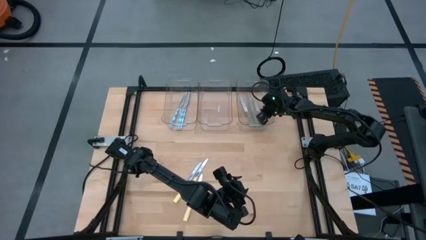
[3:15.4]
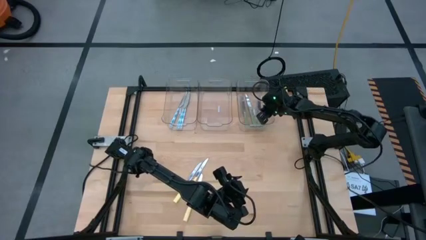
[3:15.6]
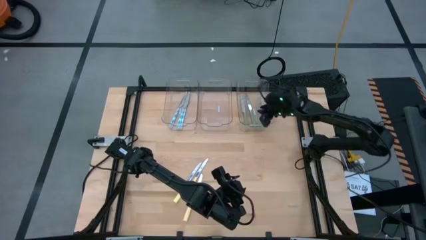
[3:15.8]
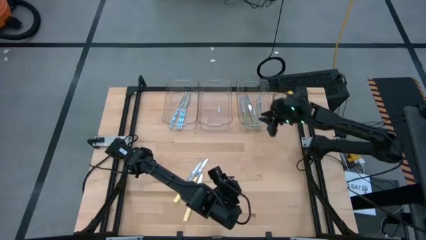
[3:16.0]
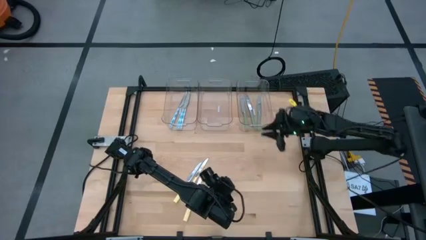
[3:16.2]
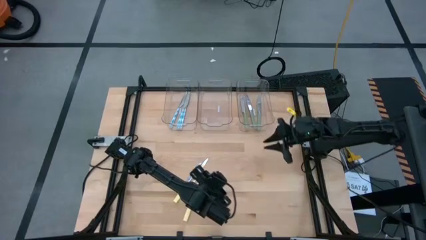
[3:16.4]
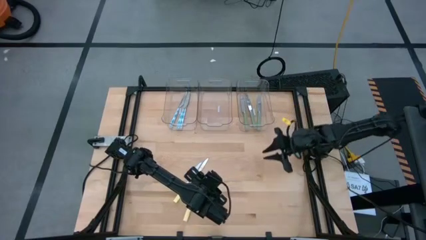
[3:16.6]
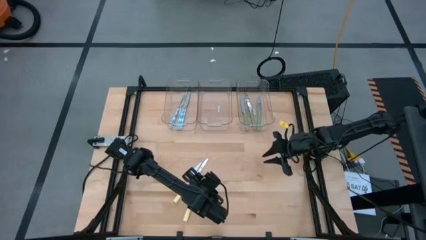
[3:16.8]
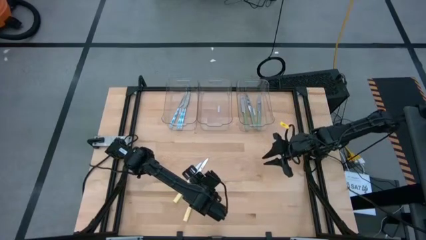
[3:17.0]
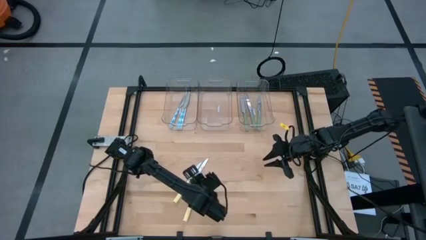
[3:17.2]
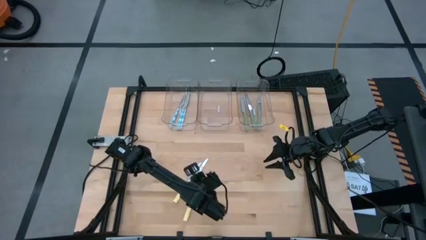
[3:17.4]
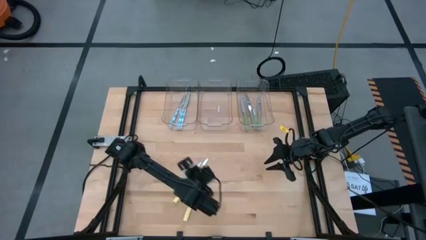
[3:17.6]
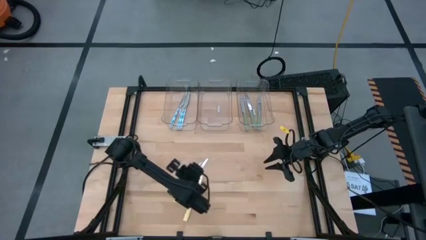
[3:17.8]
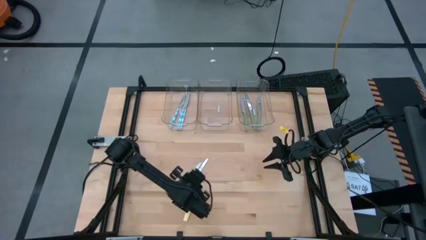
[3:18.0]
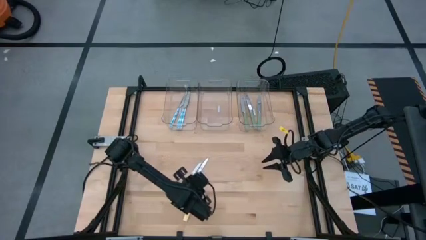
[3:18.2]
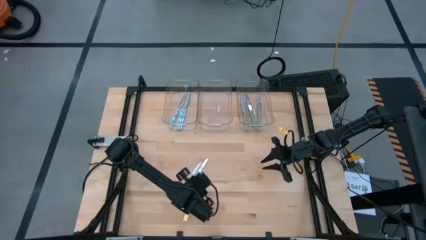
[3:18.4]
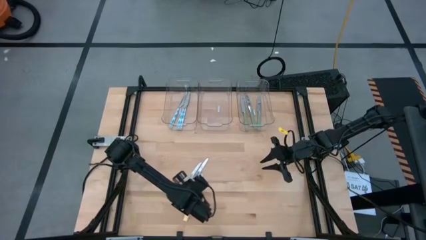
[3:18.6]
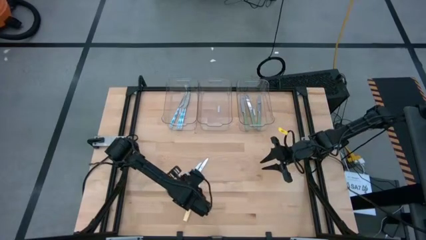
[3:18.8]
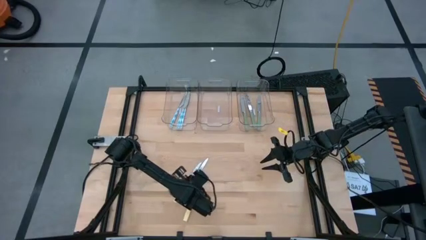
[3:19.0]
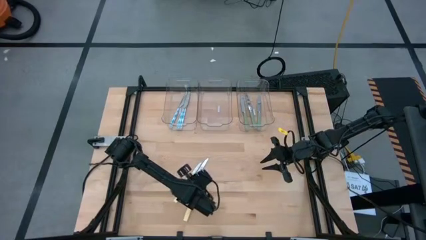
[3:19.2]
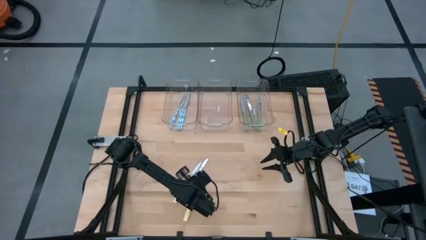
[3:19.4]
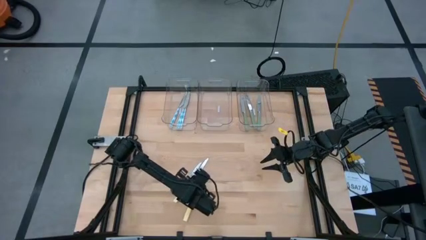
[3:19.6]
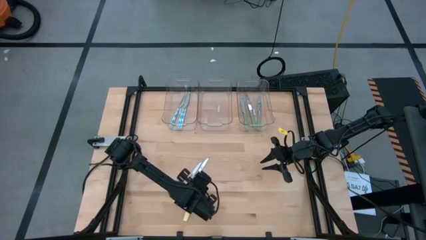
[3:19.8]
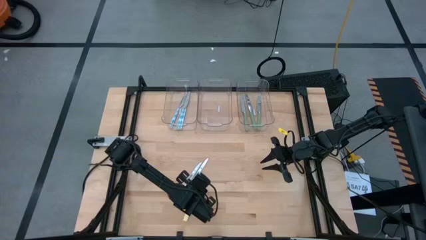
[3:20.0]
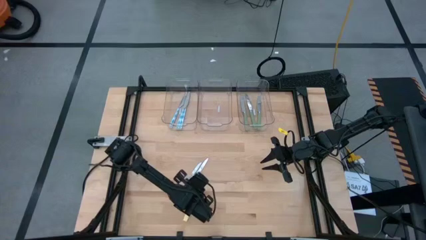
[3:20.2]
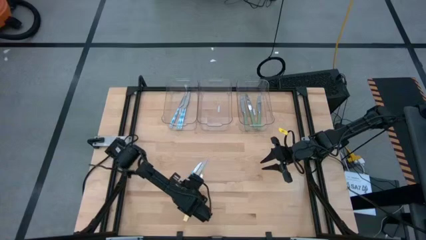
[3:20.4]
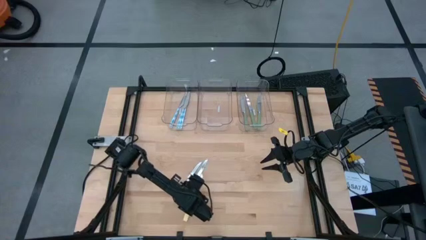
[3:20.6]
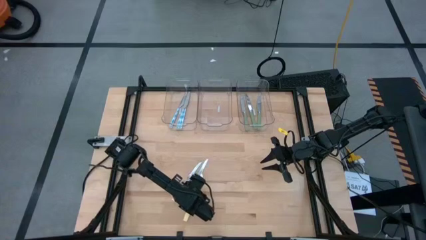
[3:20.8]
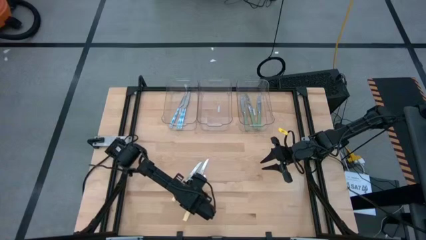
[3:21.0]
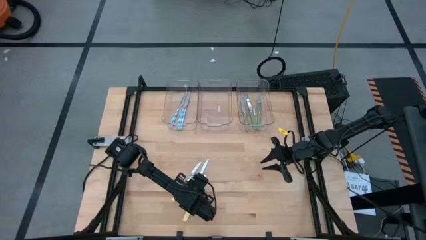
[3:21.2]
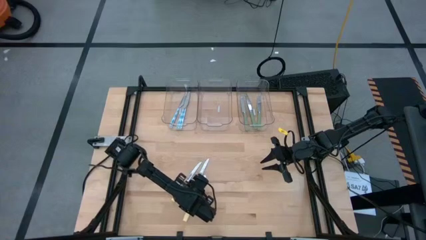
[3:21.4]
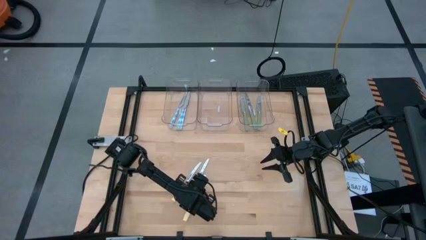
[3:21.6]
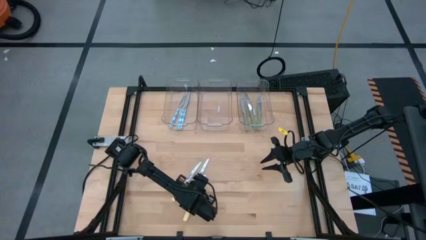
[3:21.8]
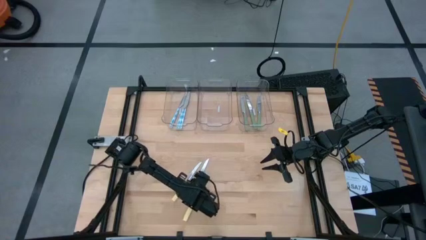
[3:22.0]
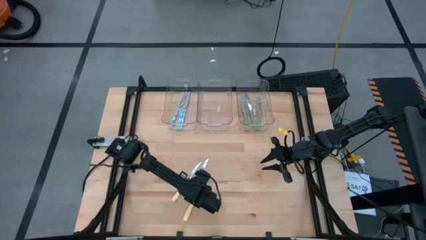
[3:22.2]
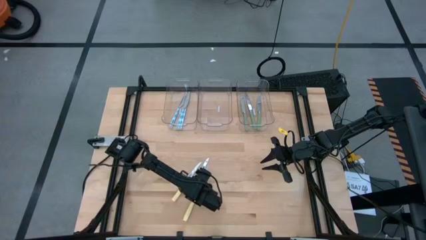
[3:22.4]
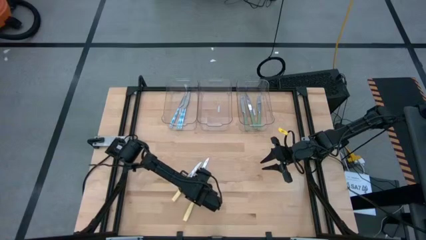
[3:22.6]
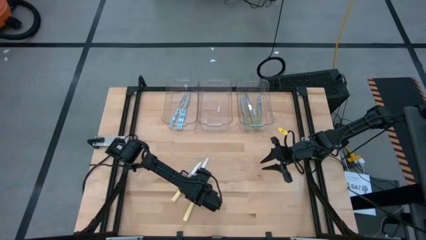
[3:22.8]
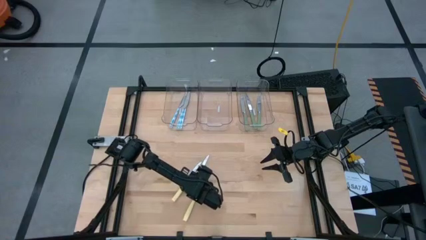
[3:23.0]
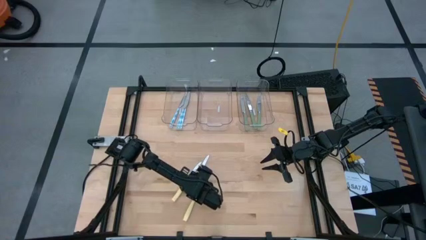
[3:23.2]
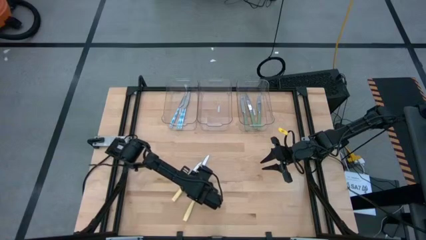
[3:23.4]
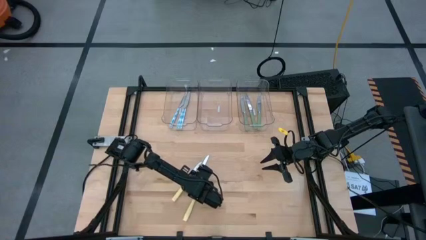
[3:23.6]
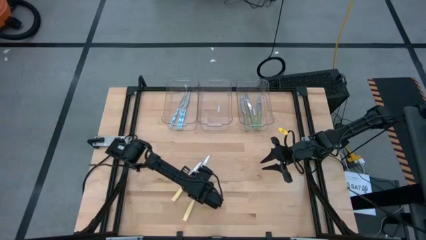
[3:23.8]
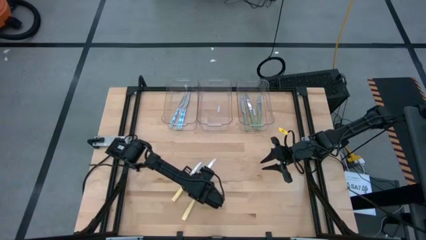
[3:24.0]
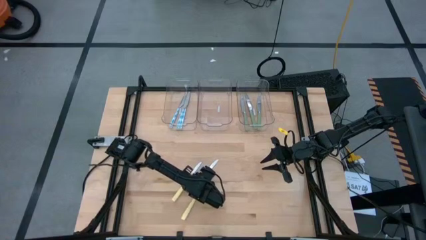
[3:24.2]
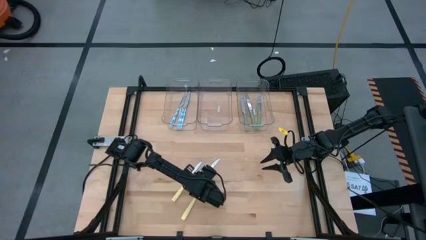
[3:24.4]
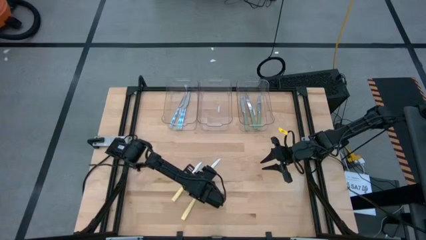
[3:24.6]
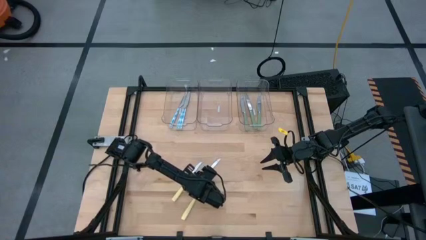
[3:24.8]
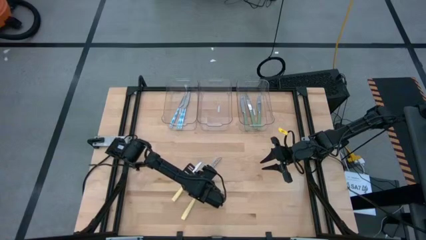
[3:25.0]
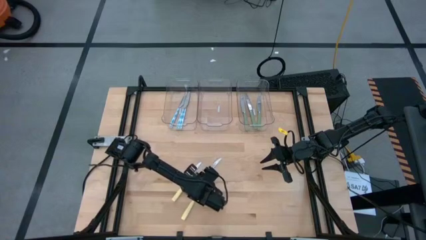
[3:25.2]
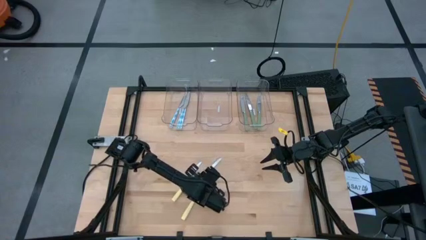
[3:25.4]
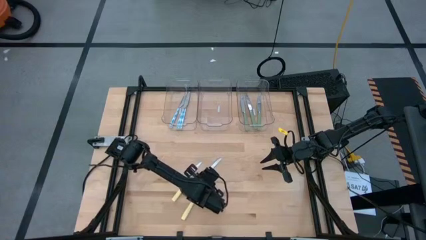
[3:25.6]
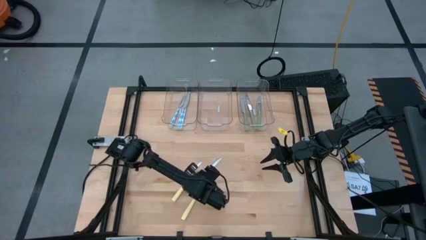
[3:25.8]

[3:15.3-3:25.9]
Task: Sort silverware by color (type)
Put the yellow knife into the middle transparent bin

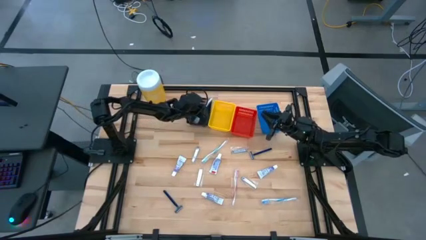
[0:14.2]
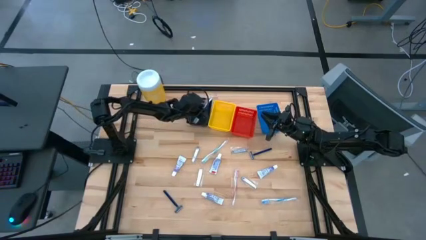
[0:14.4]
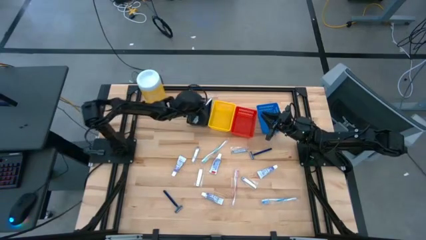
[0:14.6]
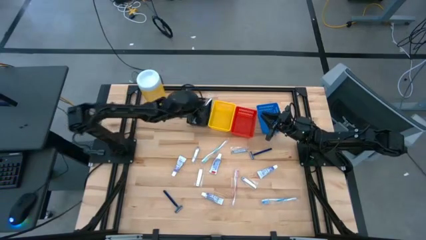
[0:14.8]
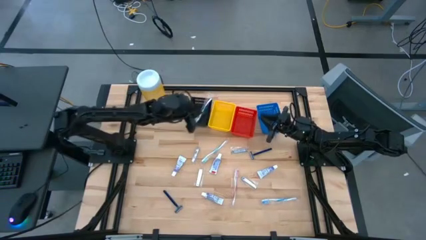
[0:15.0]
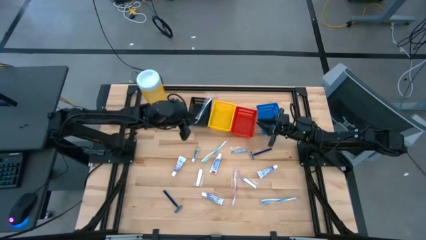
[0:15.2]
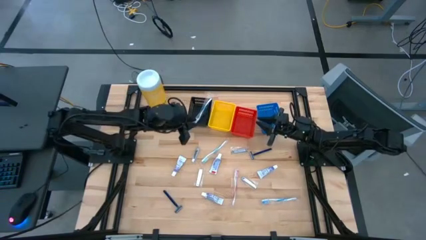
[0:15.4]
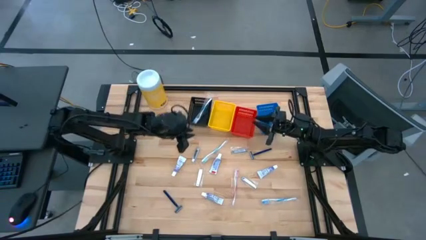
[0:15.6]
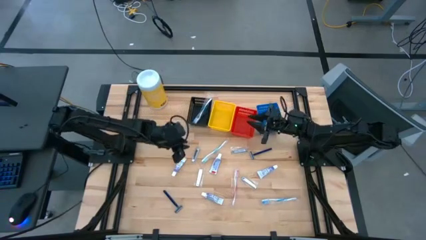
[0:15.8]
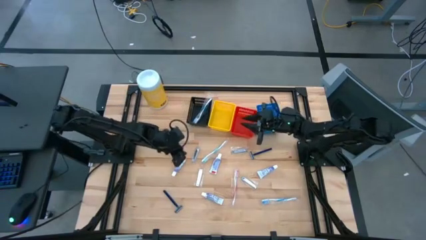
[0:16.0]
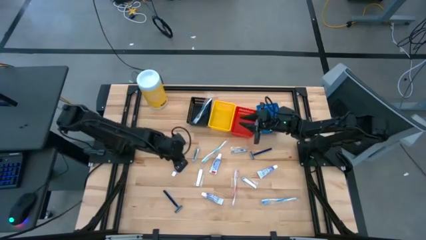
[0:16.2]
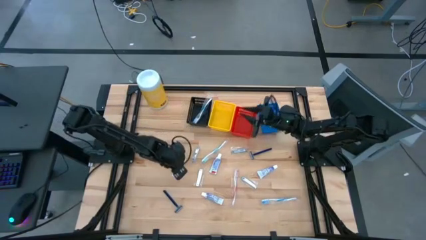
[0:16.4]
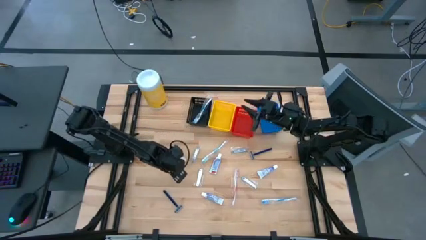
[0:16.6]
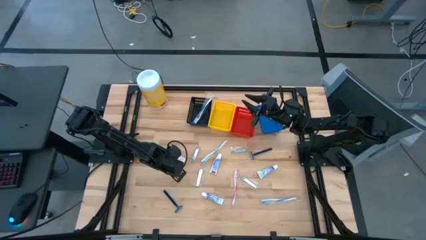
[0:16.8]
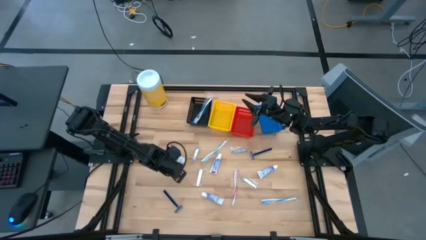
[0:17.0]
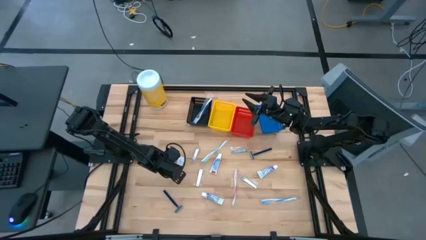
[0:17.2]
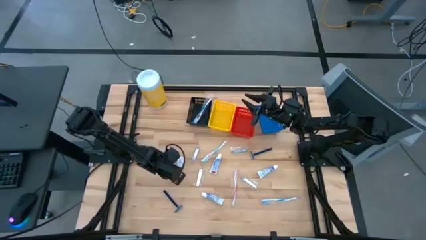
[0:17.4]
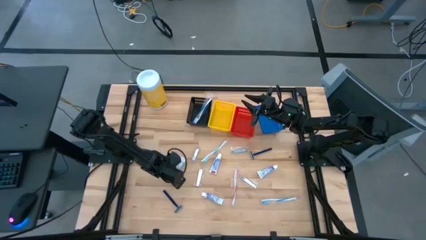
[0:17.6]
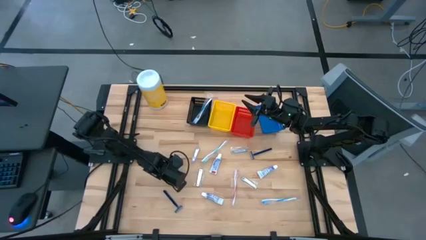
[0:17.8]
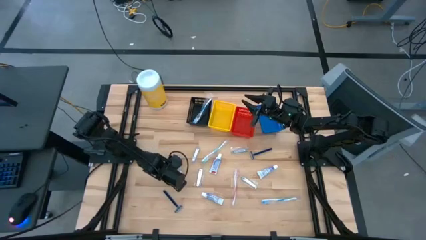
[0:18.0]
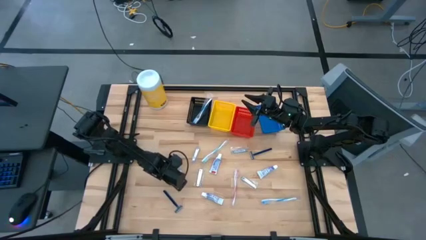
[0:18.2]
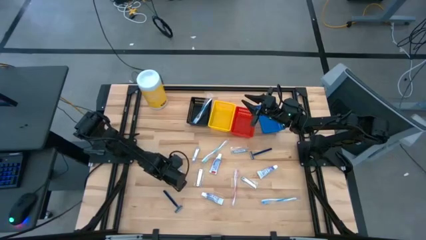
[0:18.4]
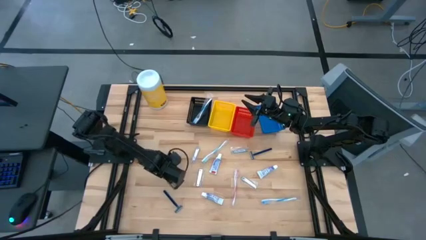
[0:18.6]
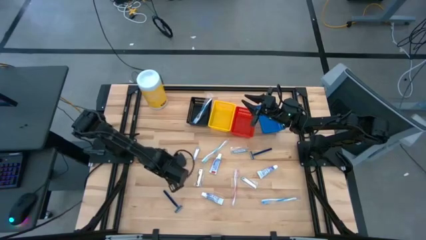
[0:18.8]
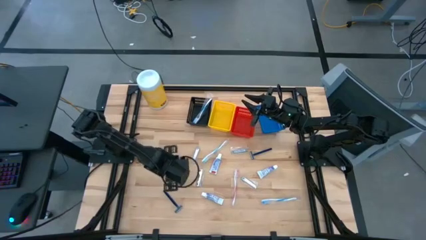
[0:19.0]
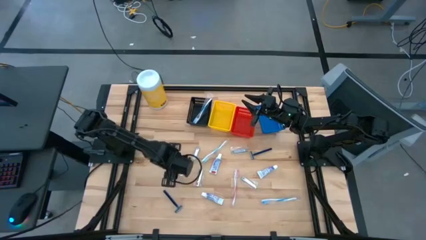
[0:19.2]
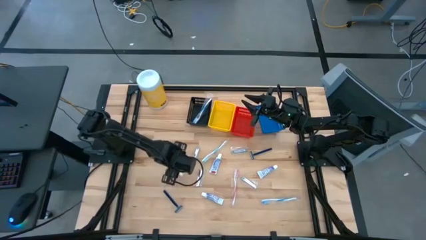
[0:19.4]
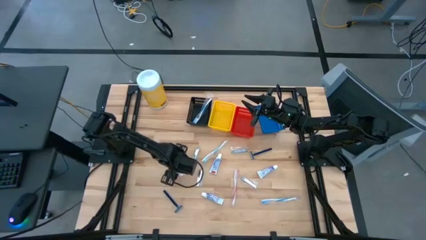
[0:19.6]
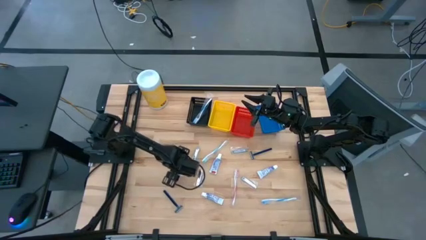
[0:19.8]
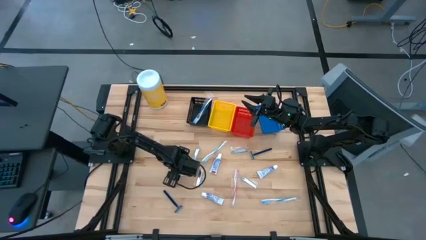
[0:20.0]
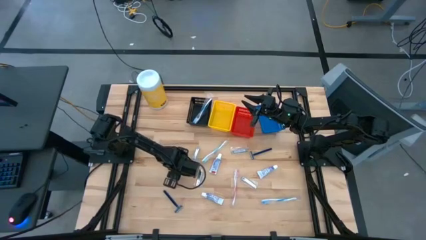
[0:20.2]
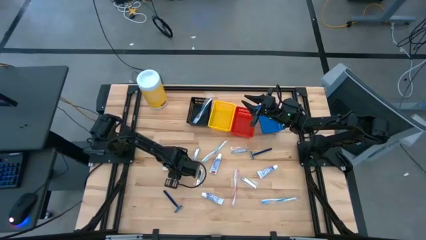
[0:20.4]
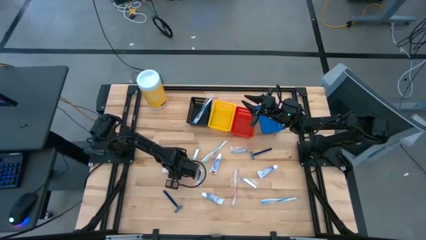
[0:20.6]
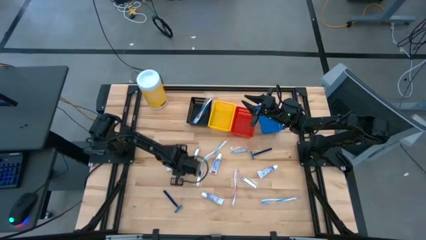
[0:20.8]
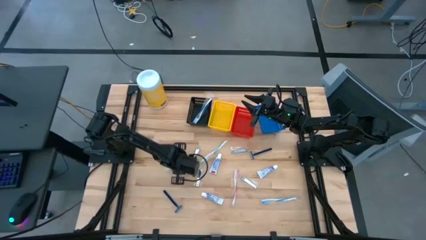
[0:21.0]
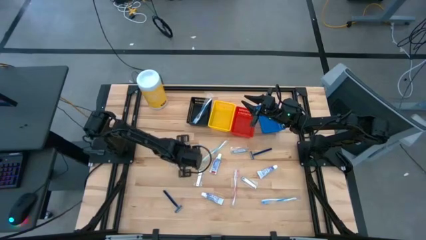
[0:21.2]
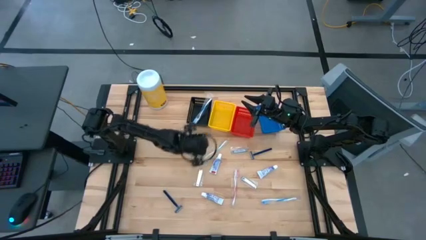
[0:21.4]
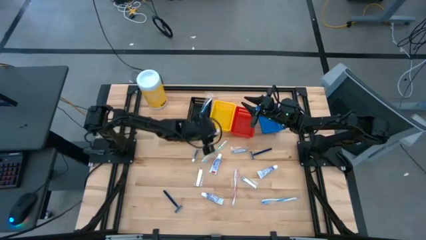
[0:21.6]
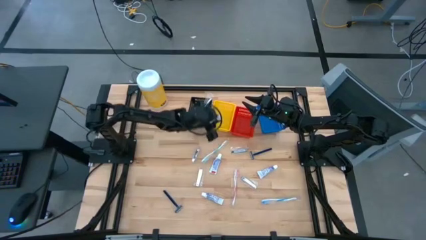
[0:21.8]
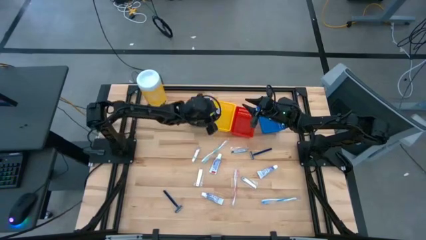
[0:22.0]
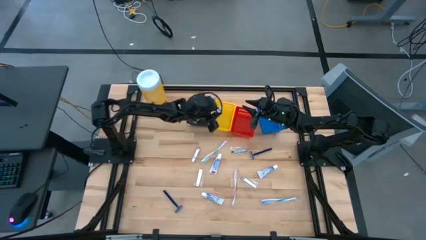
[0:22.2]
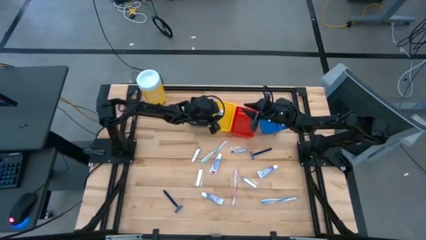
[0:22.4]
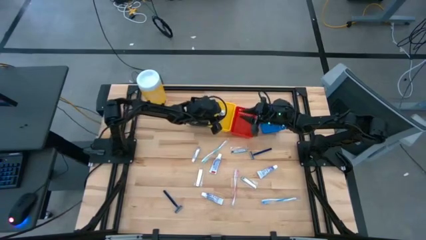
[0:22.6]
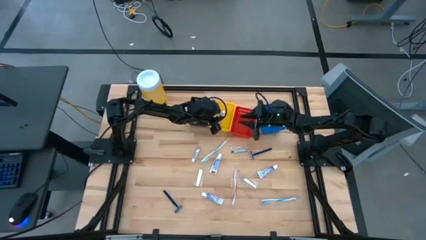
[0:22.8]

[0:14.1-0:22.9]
Task: Pick & Place Travel size toiletries
Put the white toothpaste into the yellow bin
